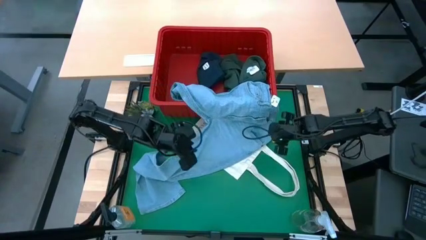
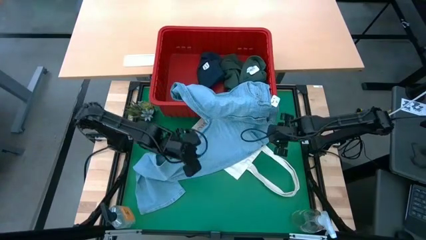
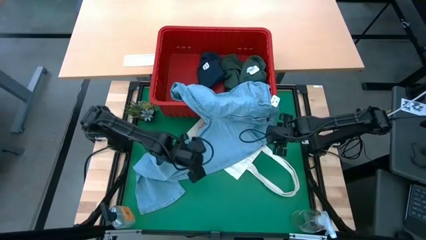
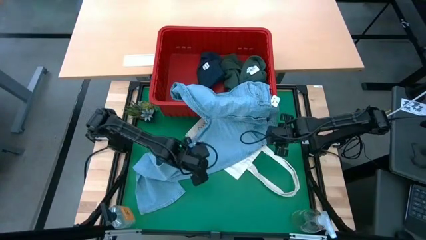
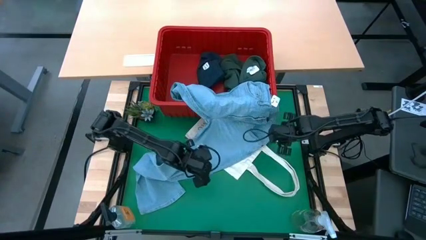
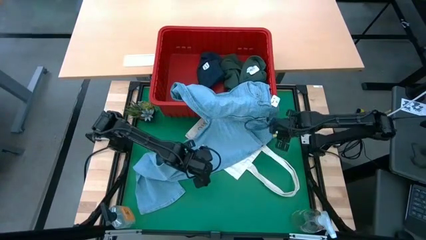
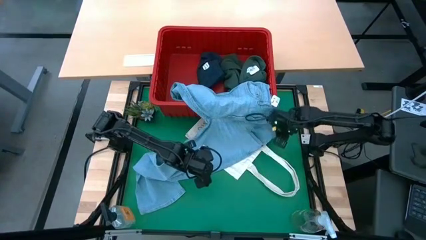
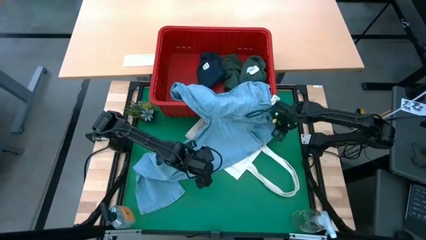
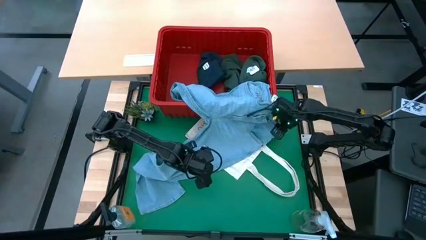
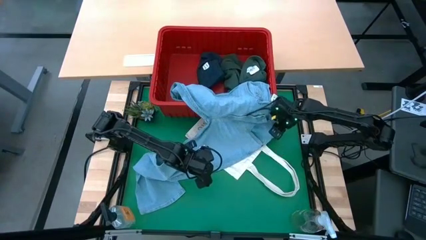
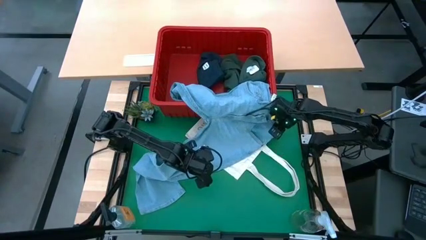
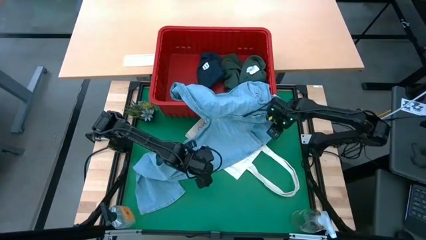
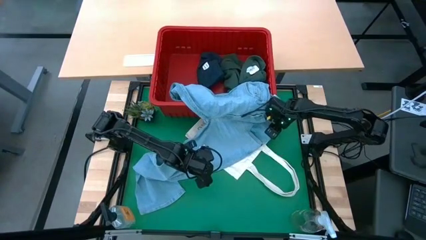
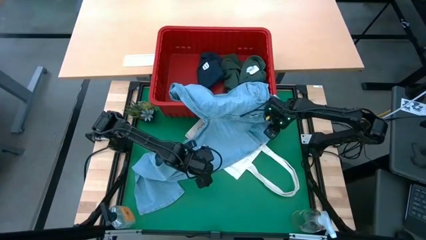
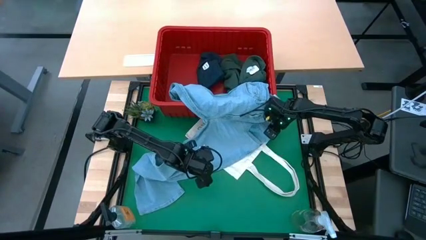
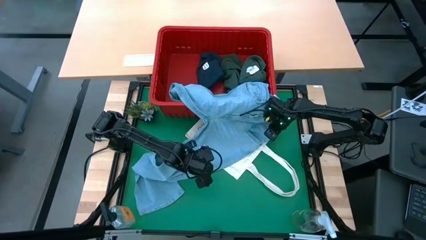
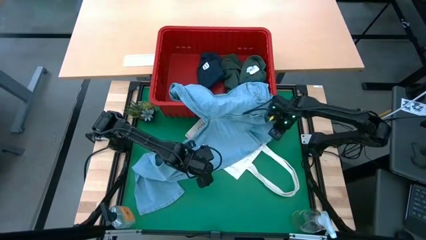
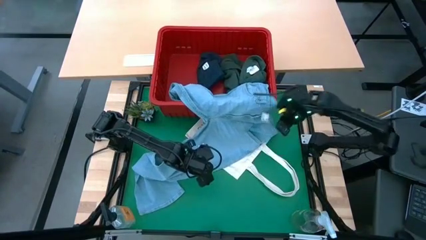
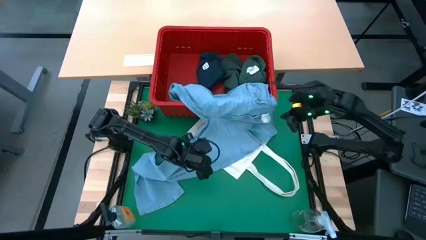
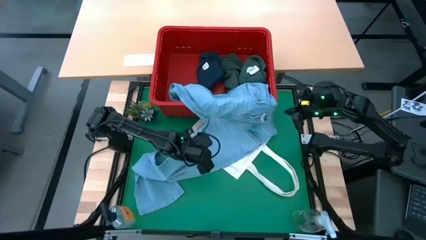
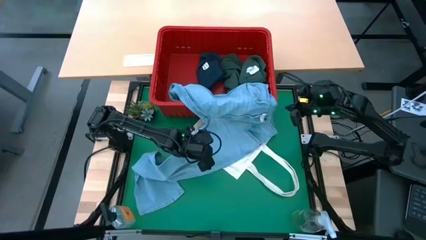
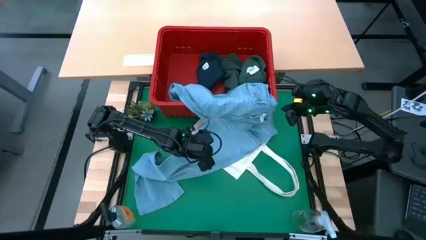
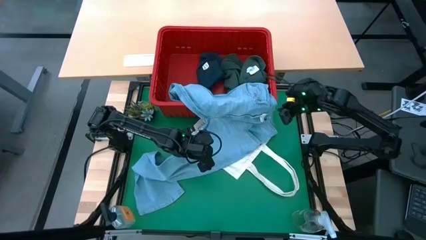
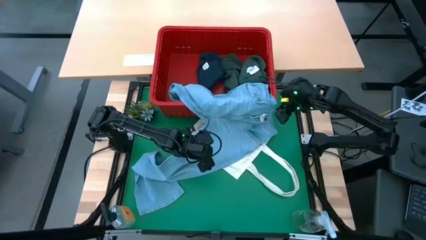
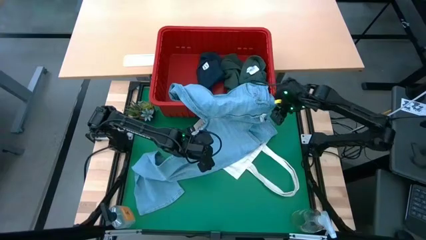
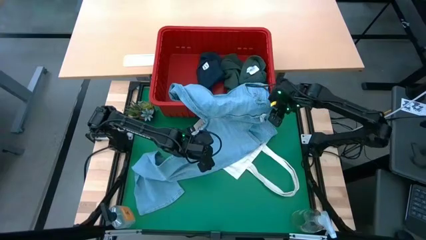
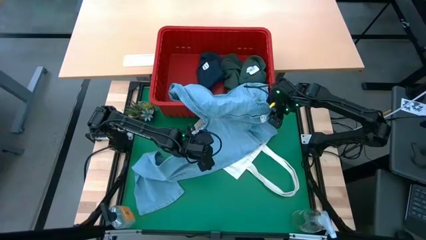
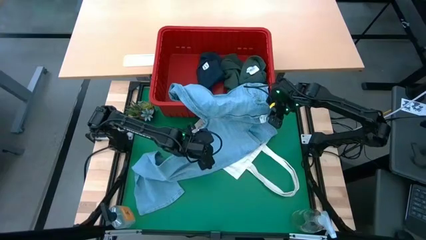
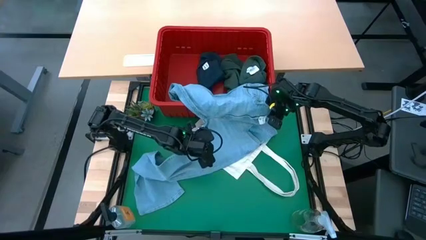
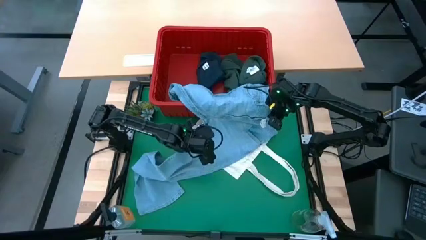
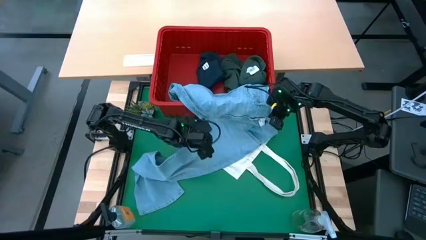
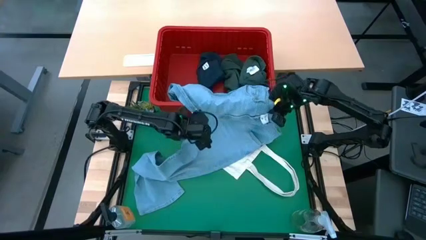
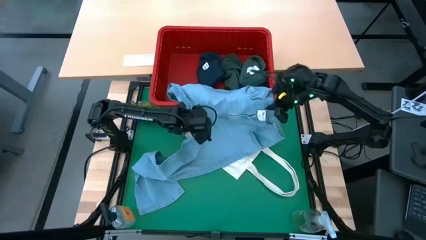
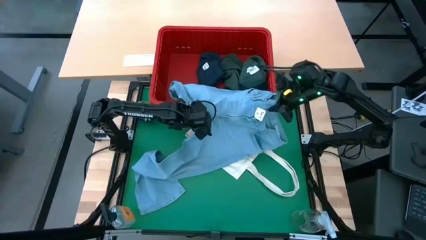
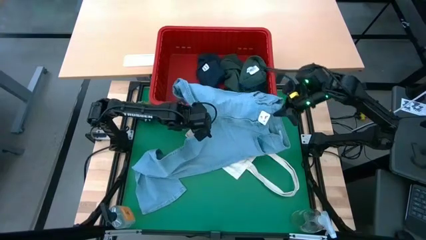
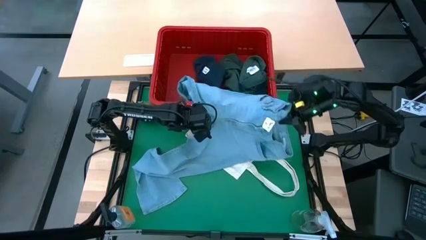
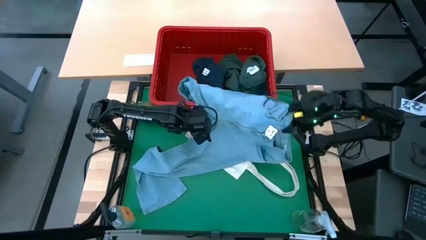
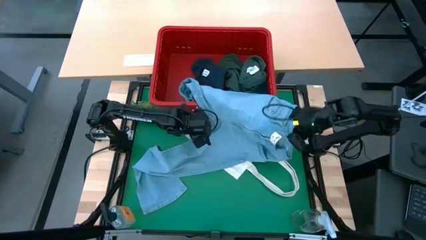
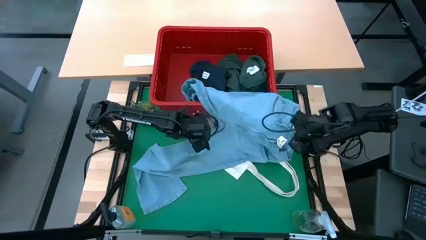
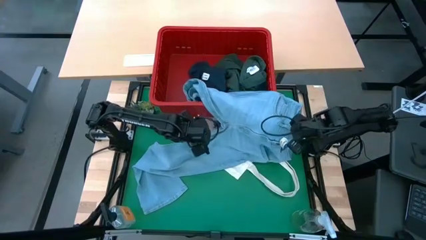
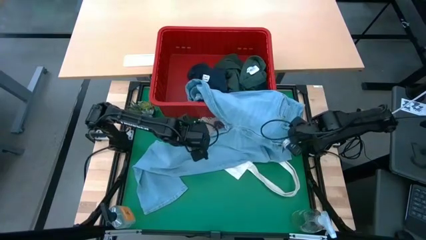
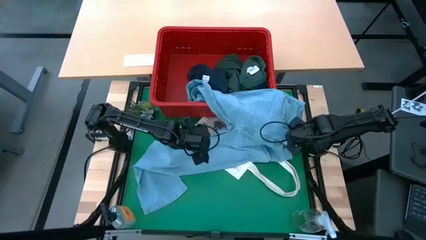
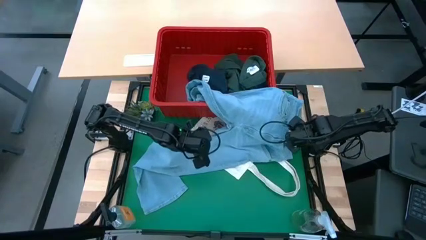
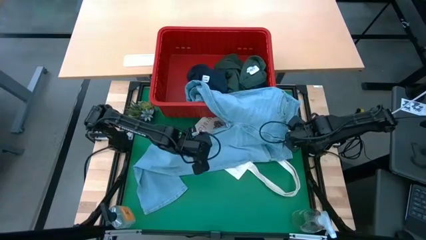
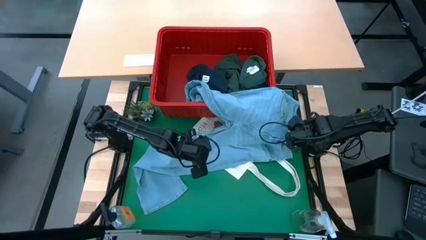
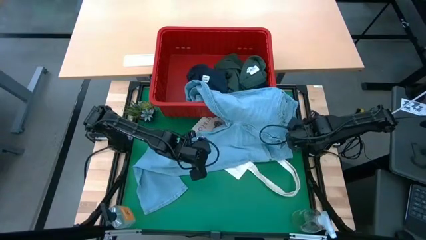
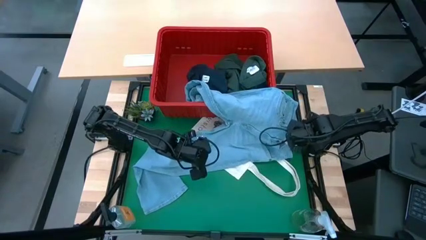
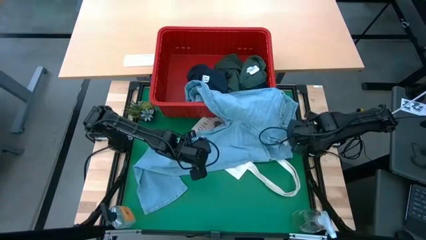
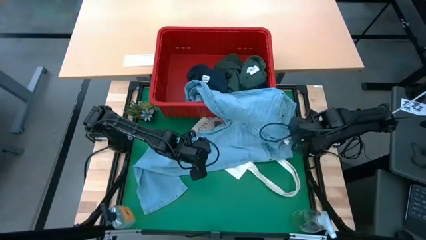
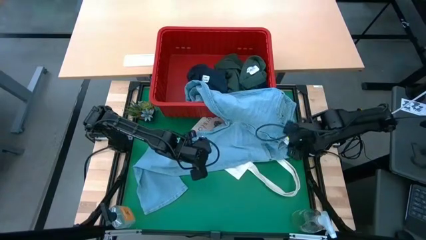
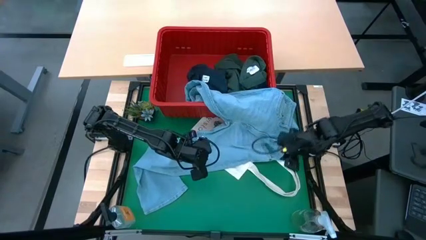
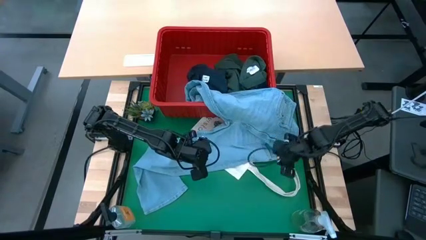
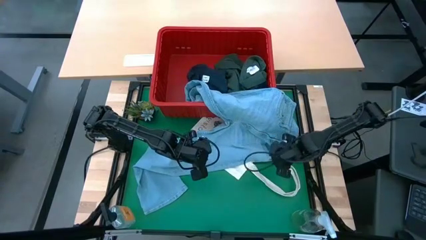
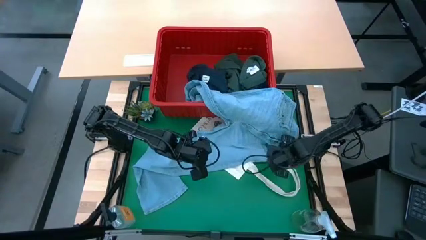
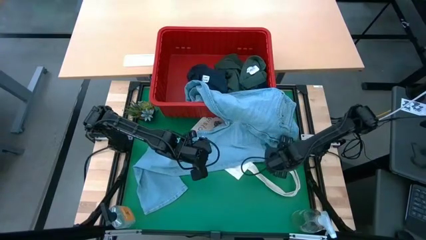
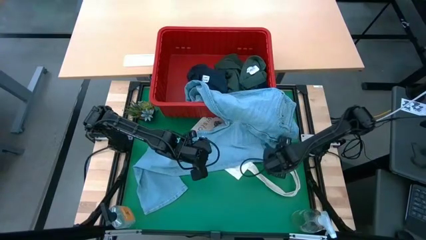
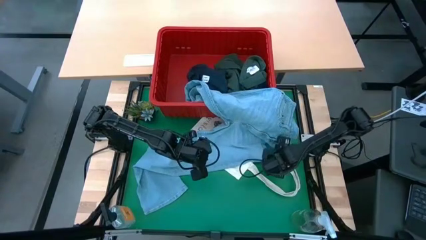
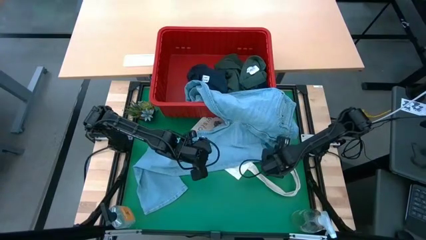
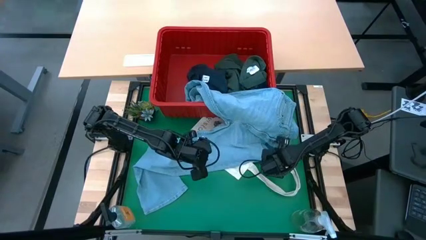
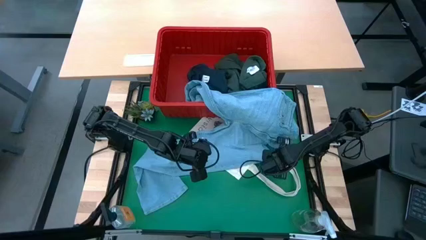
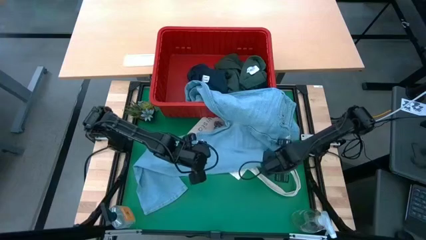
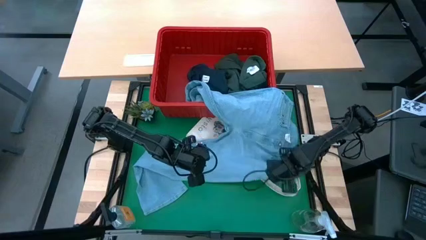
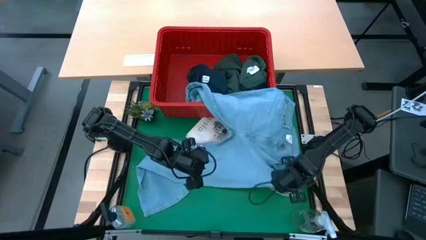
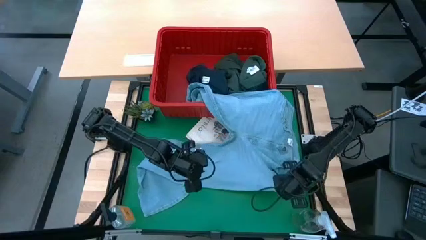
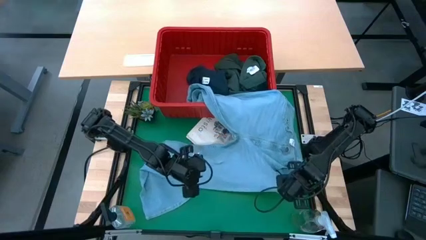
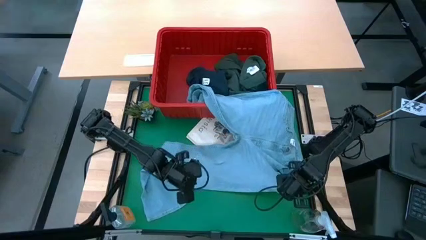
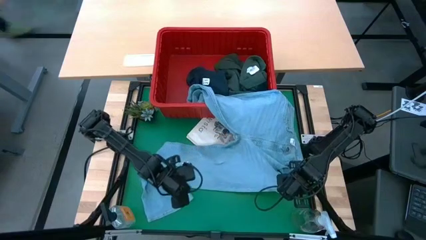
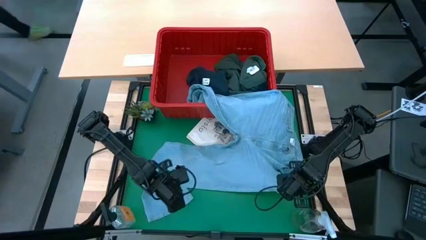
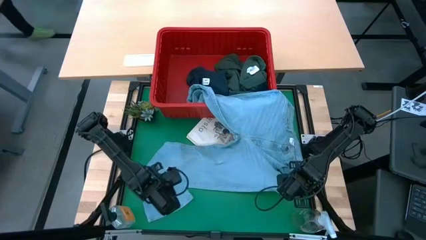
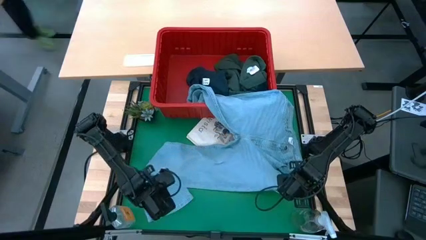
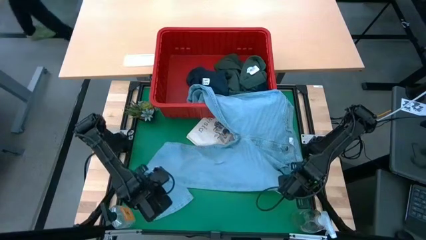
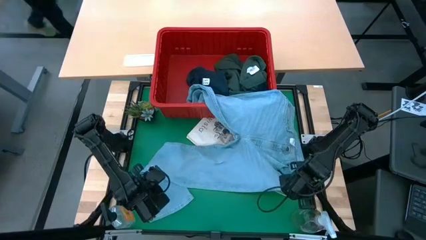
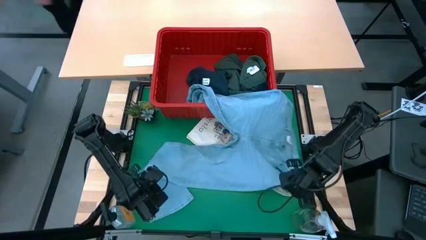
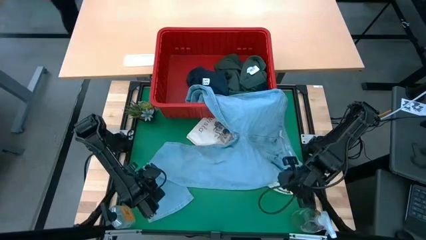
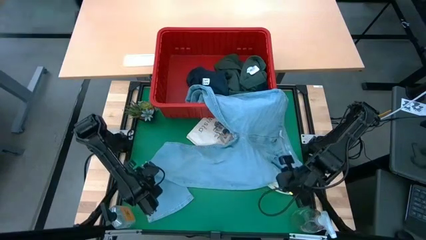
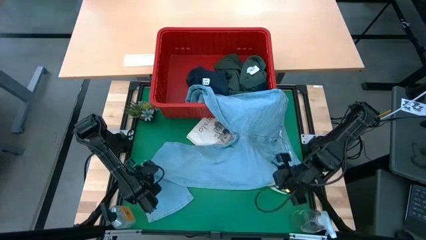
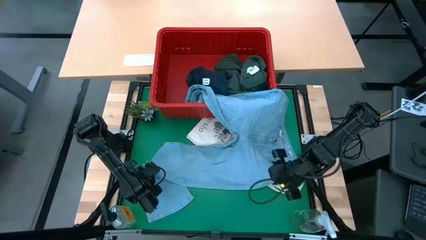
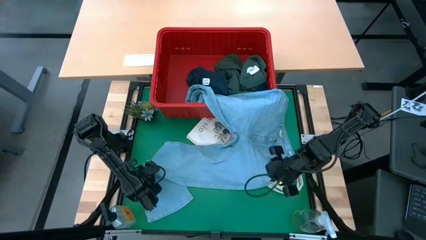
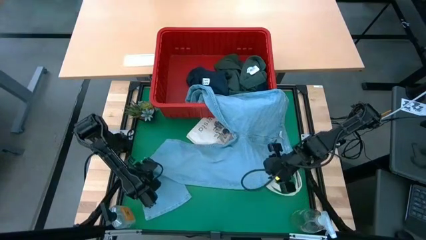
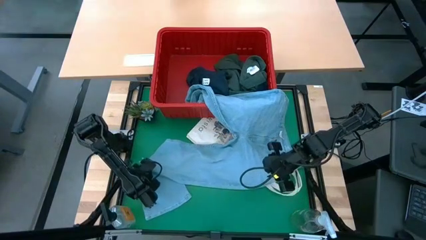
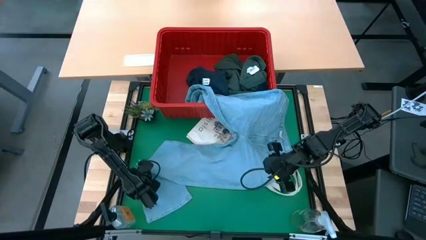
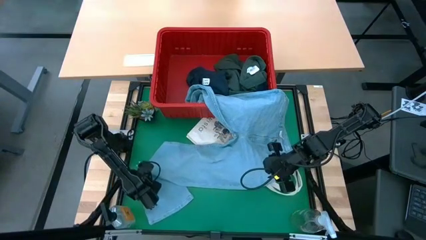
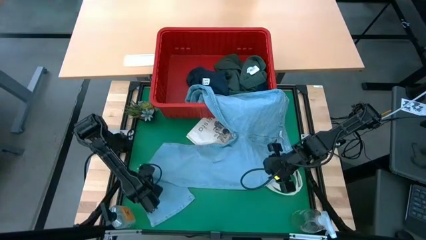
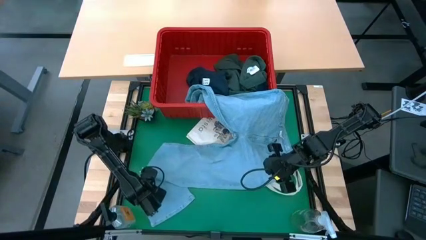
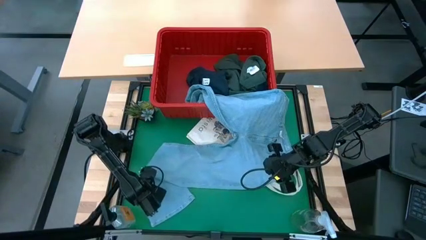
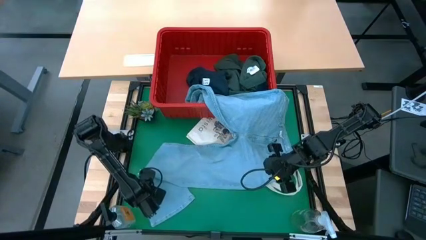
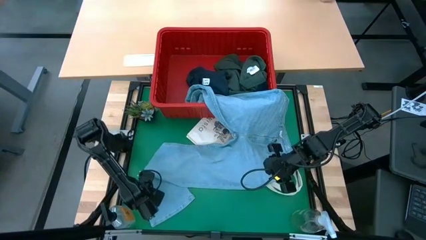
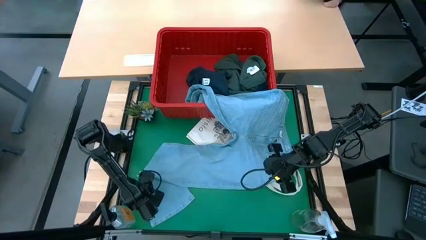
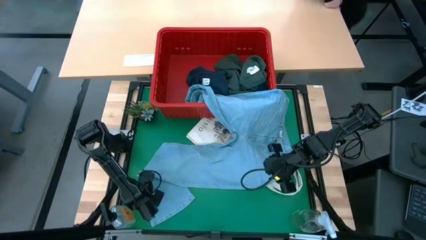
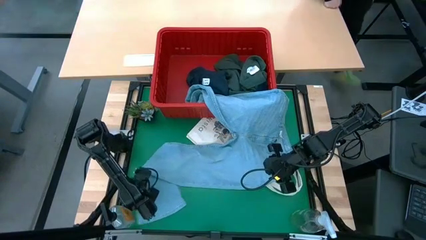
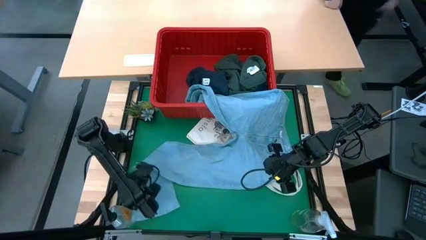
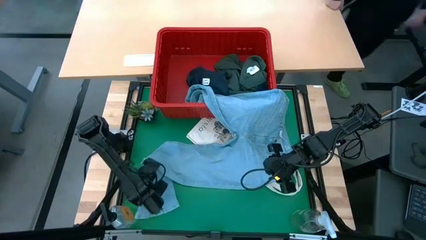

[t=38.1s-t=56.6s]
Task: Fold laundry
Fold the light blue pants
